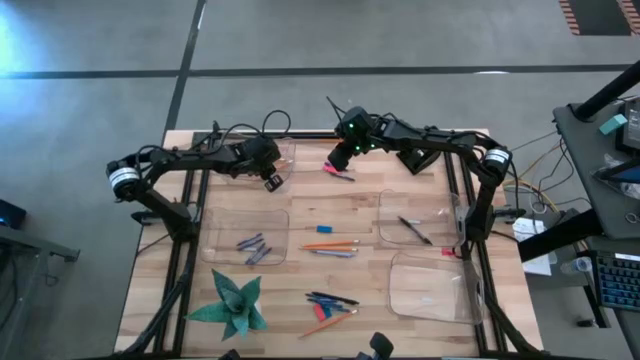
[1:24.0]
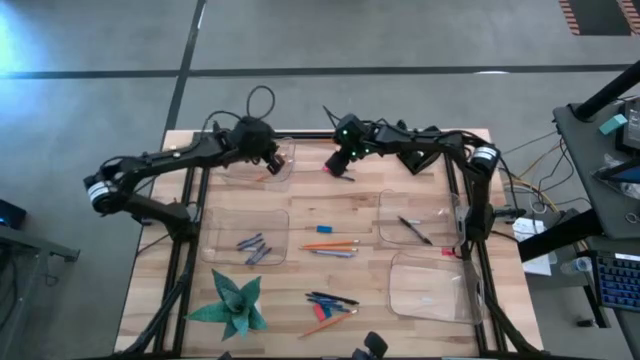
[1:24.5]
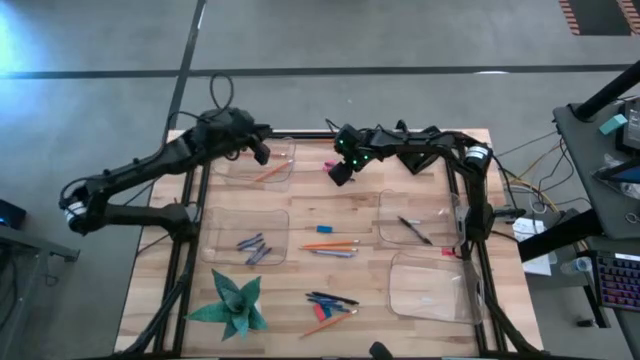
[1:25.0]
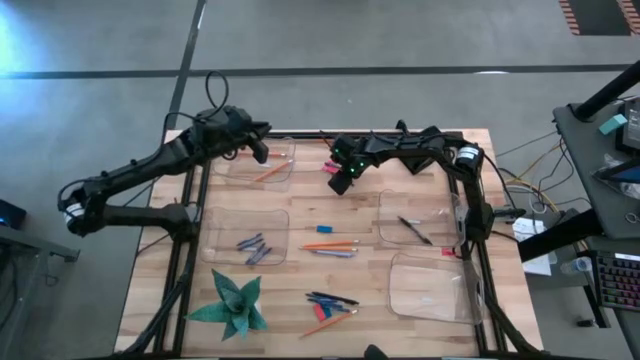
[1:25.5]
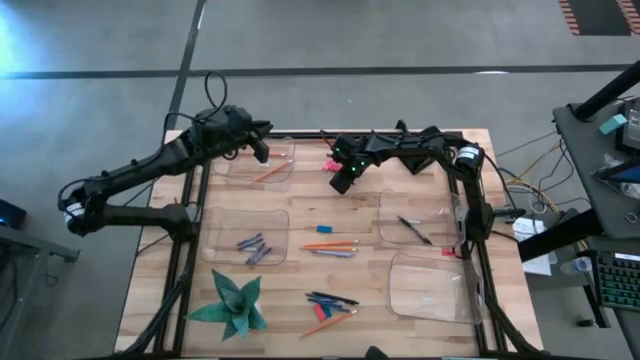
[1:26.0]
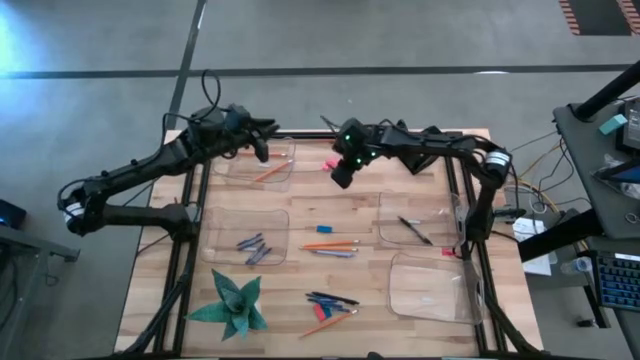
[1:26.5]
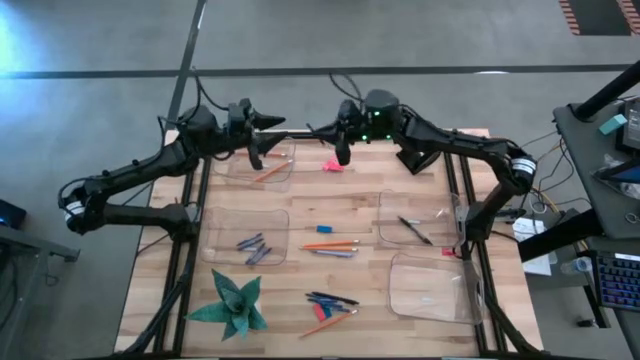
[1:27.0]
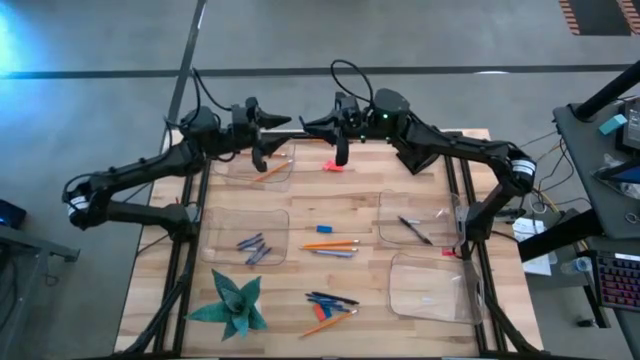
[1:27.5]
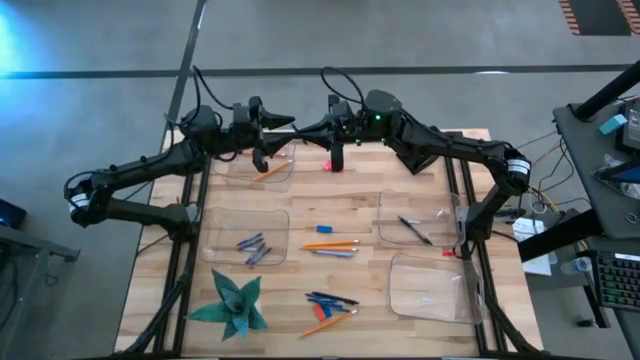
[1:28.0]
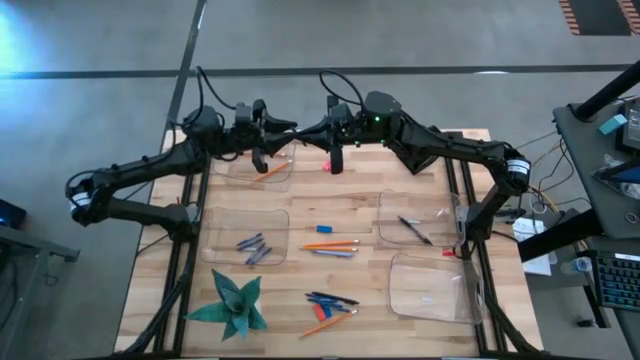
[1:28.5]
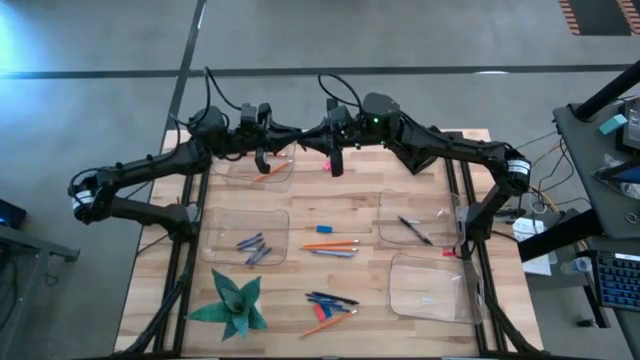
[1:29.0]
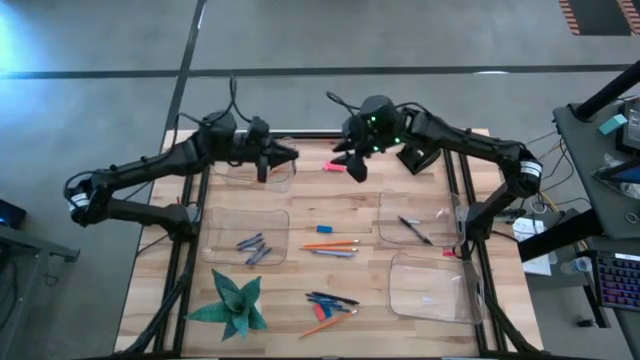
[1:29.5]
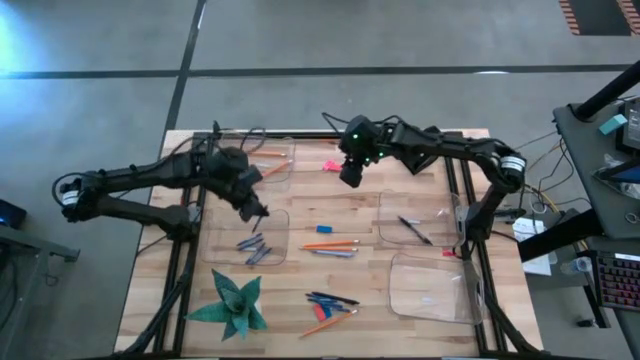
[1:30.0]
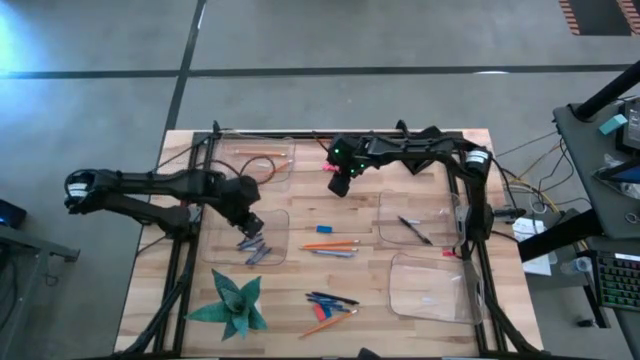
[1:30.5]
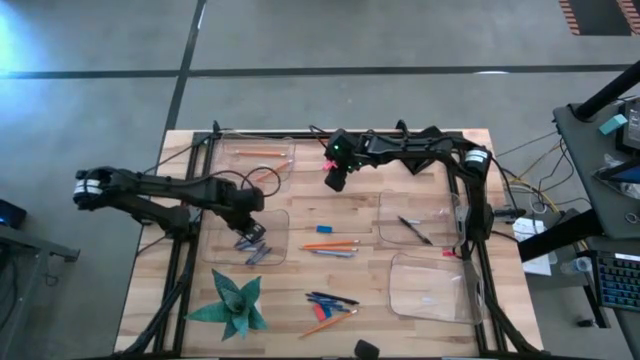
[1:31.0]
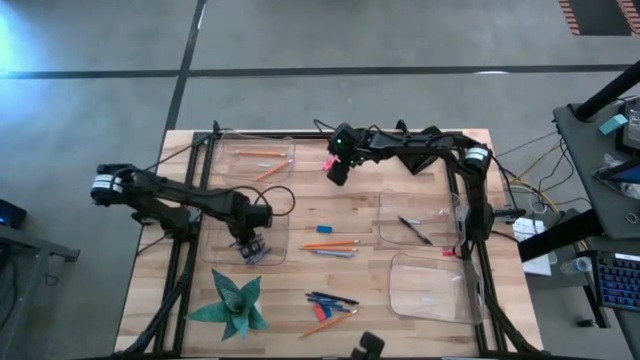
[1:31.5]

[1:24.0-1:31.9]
Task: Sort crayons/erasers/pens/pencils in bins
Put the blue crayon into the middle left transparent bin

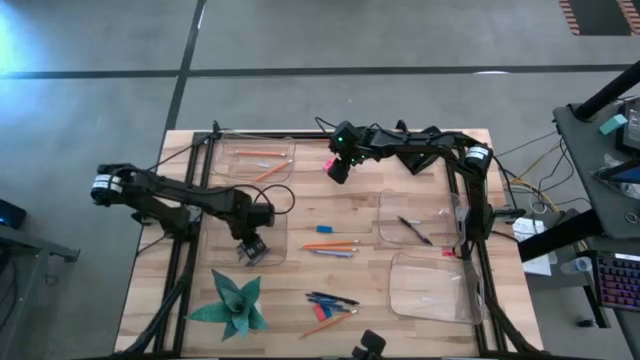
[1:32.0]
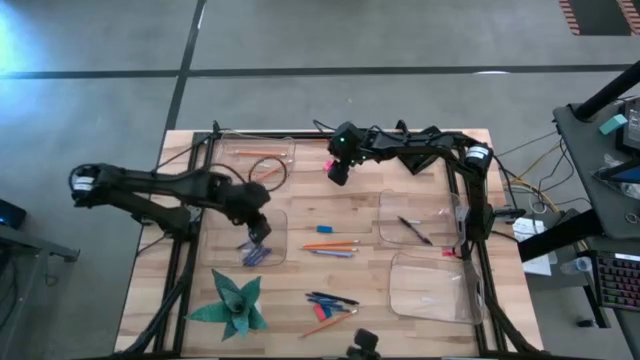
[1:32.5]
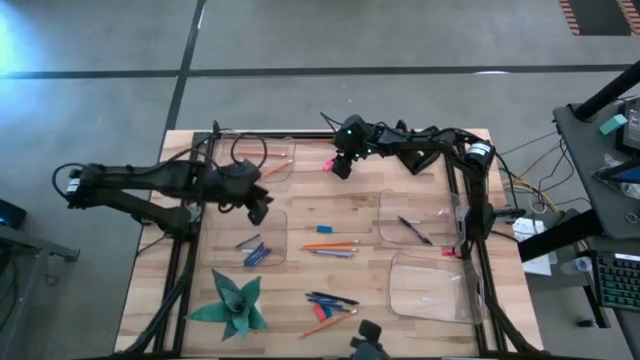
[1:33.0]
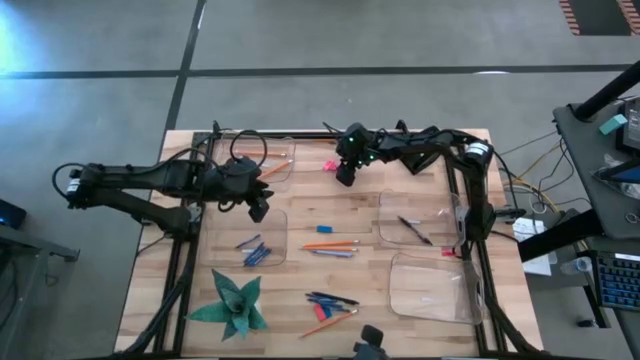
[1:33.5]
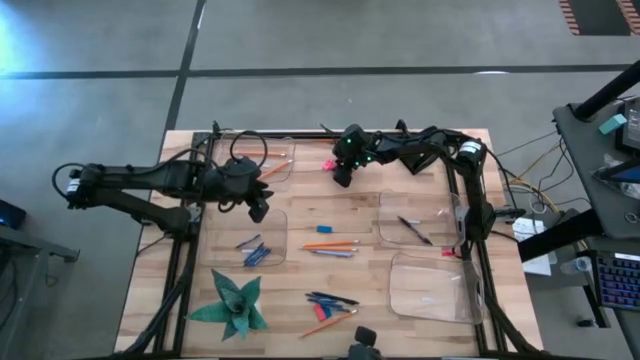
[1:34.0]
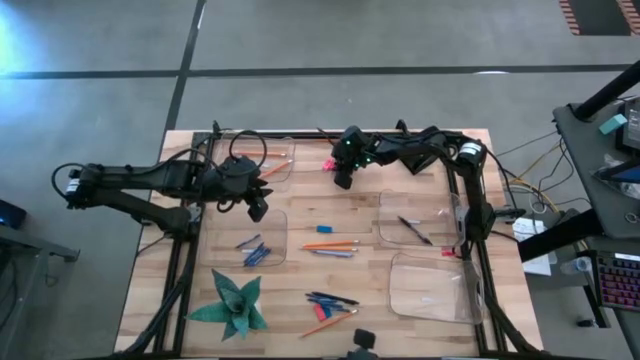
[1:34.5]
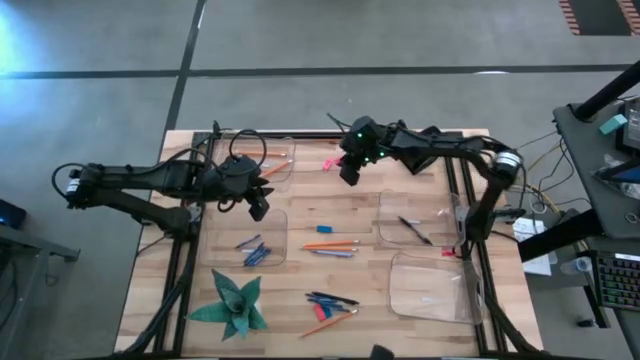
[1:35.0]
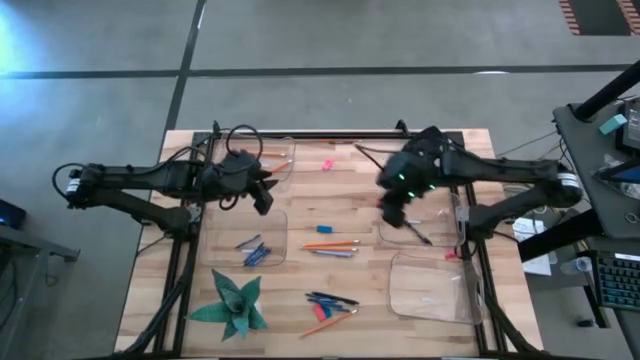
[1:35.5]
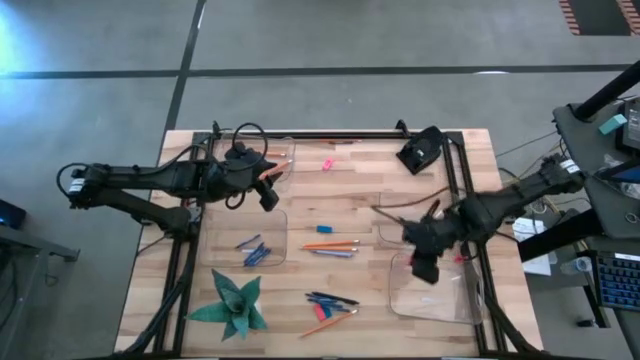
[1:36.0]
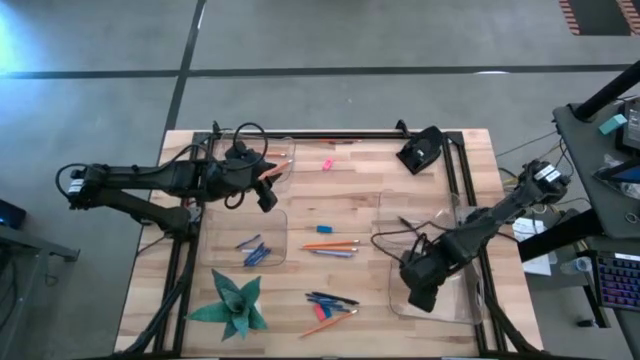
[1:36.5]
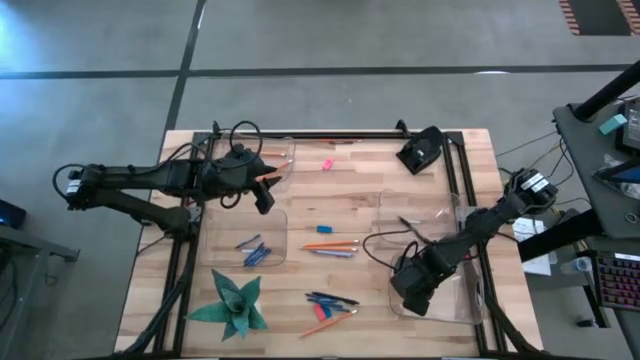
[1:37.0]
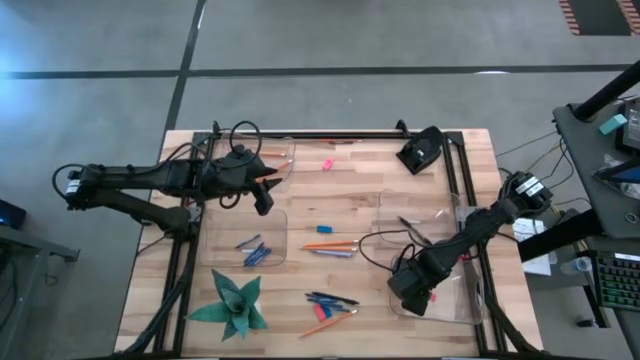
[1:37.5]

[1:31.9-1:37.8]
Put the orange eraser into the bottom right transparent bin

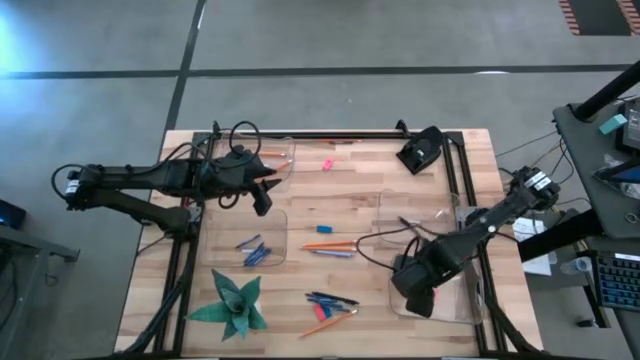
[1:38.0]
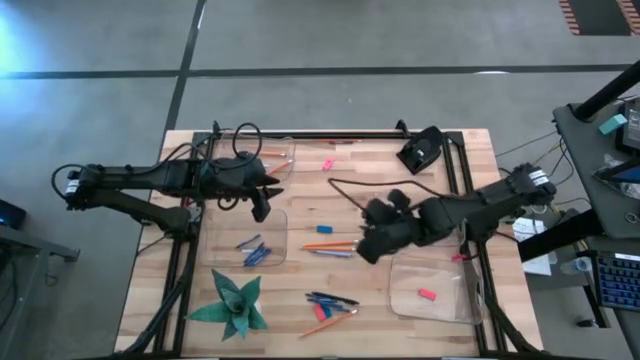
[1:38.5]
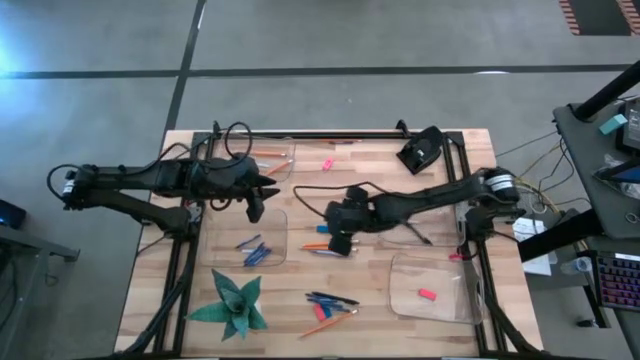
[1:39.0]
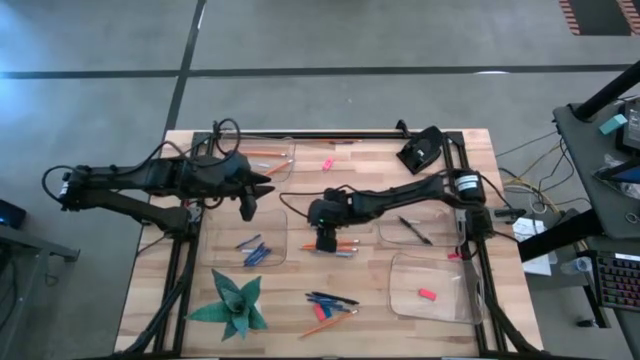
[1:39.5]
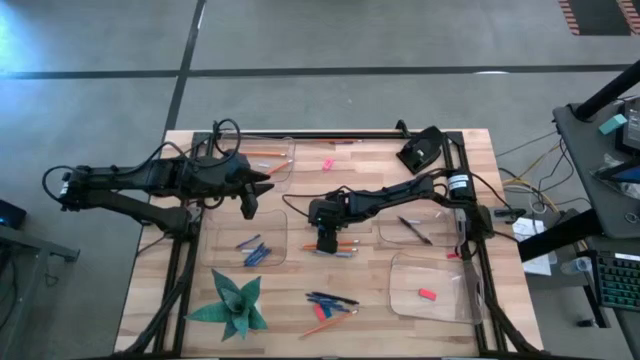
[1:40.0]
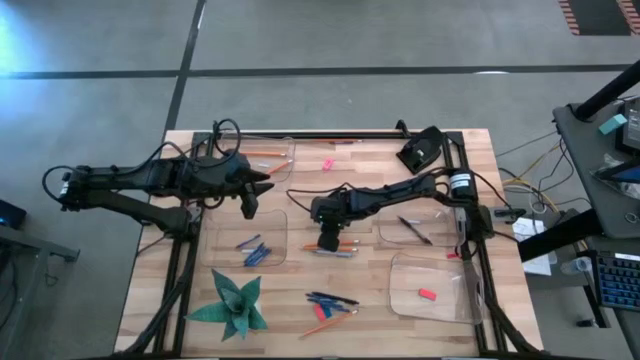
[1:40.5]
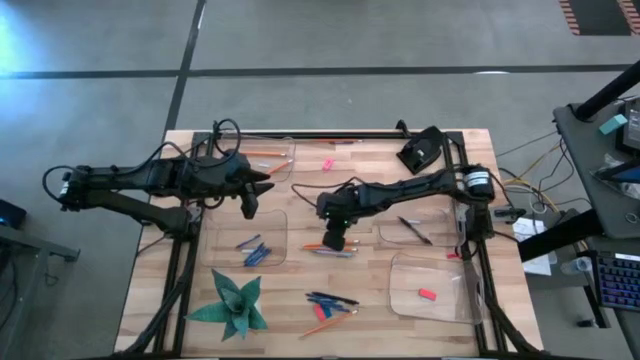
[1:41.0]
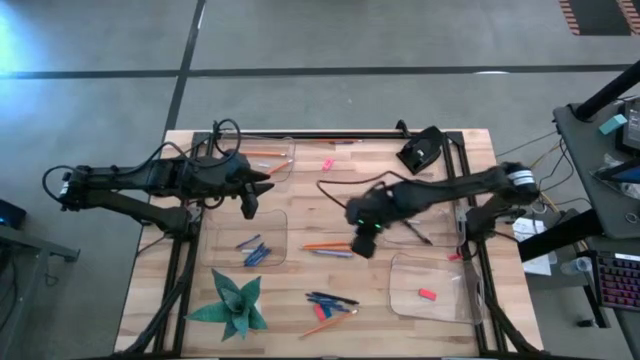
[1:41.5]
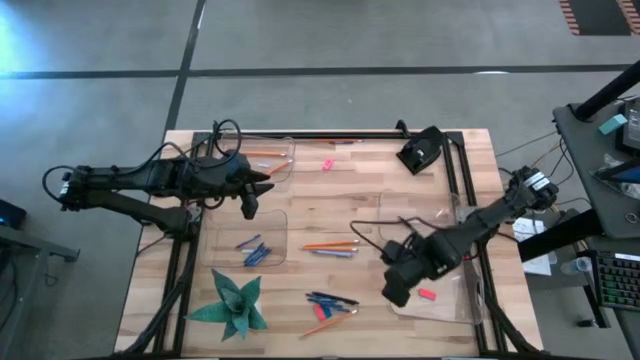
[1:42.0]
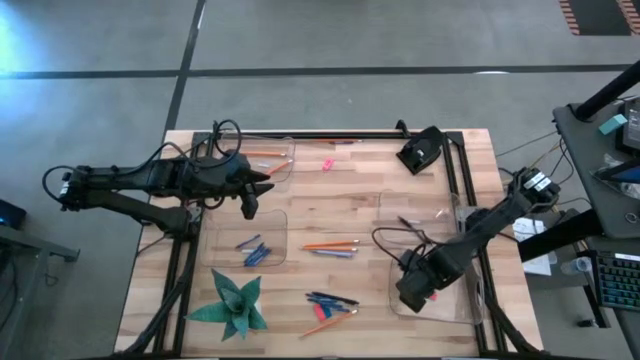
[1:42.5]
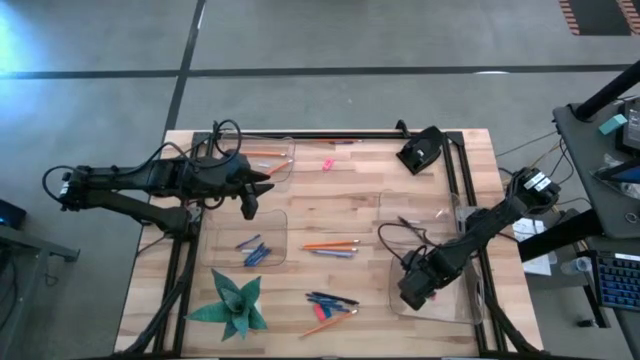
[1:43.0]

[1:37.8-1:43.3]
Put the blue eraser into the bottom right transparent bin

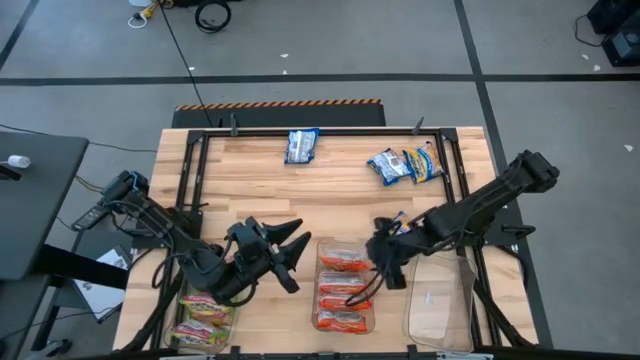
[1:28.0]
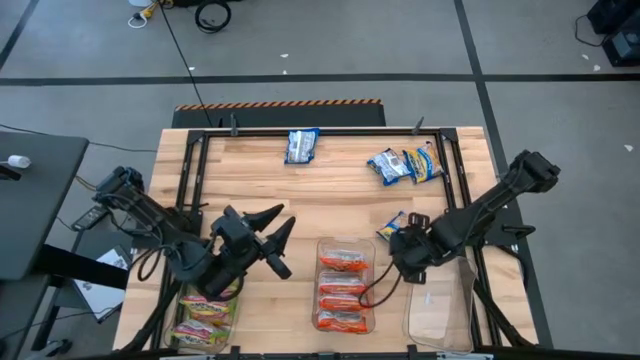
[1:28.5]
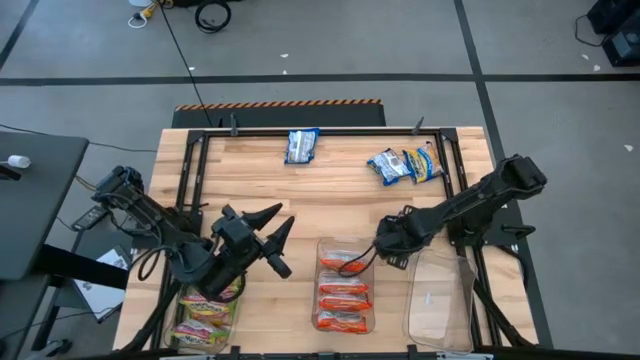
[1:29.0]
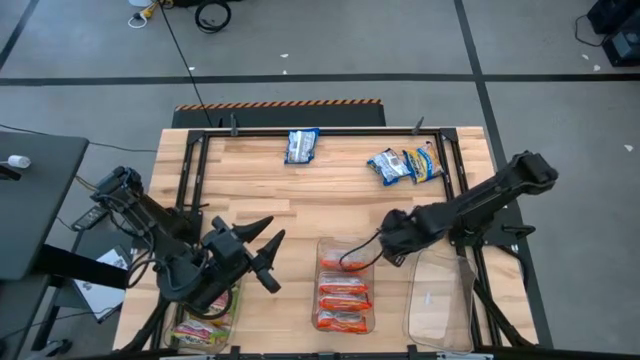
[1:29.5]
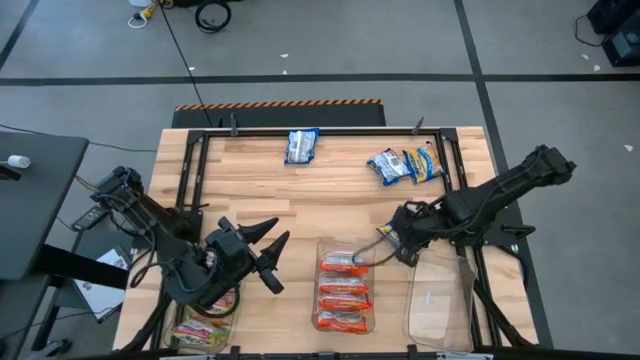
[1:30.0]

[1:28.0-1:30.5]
Task: Sort Maruchan noodles
Put the blue noodle pack into the right transparent bin
